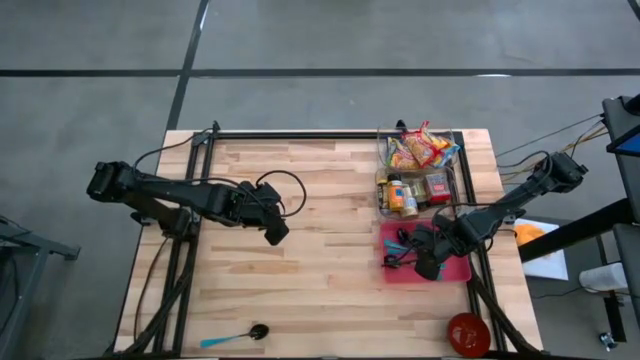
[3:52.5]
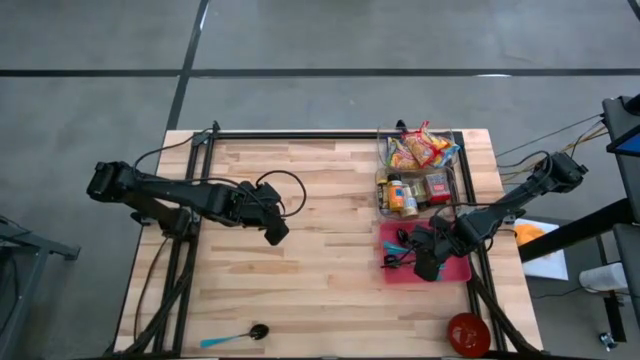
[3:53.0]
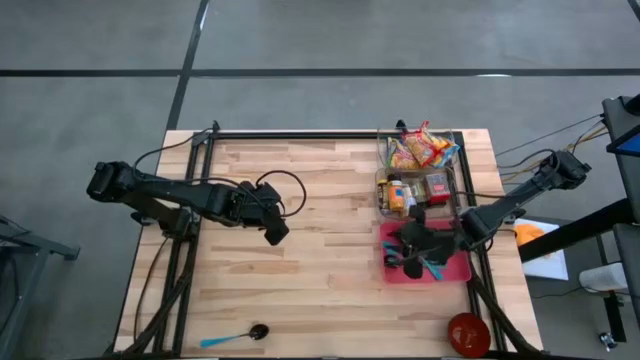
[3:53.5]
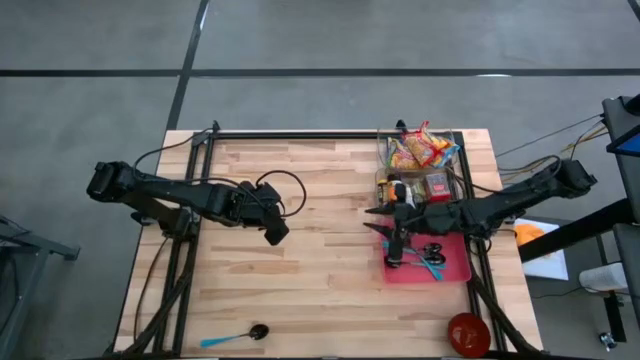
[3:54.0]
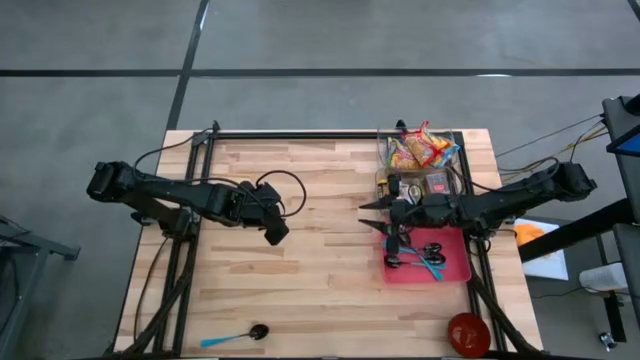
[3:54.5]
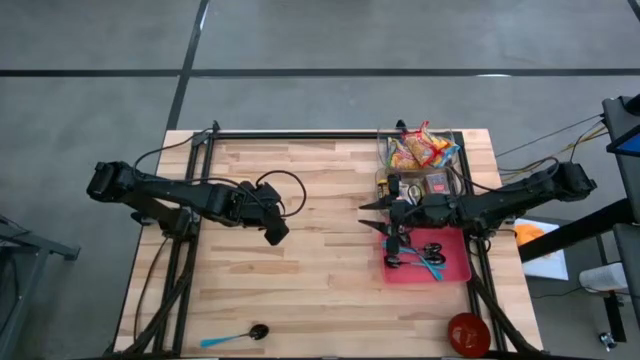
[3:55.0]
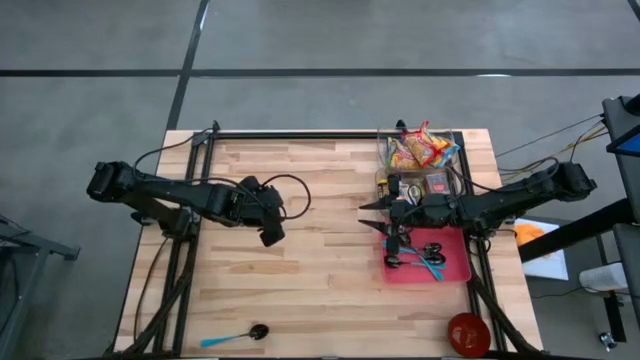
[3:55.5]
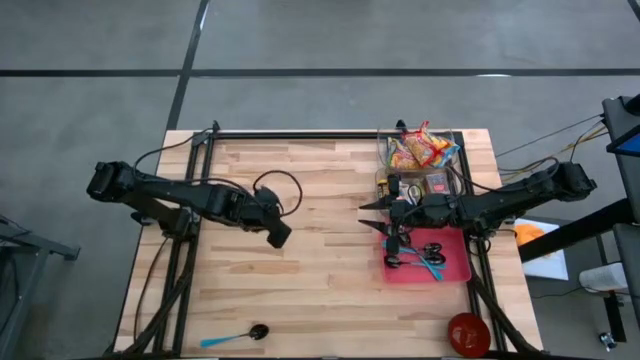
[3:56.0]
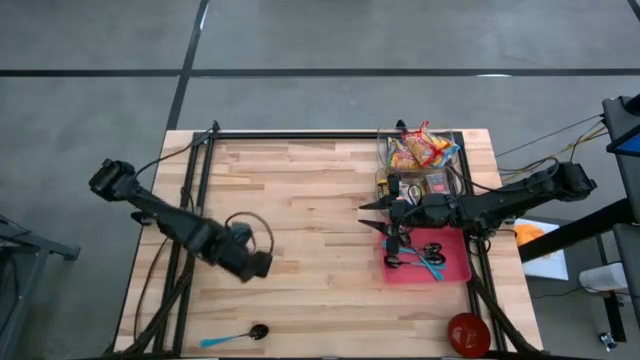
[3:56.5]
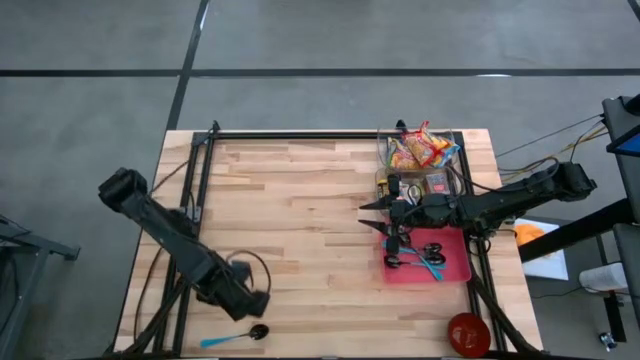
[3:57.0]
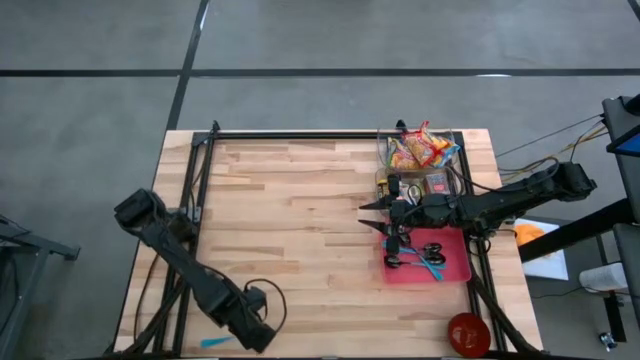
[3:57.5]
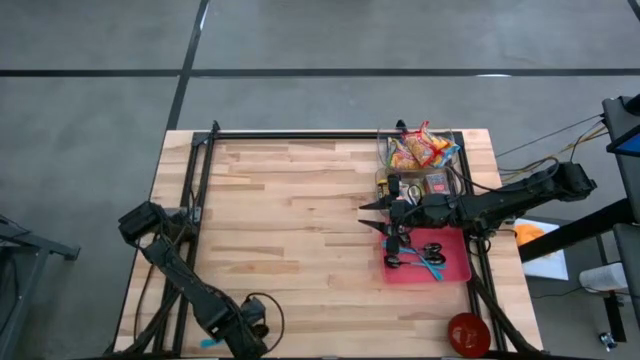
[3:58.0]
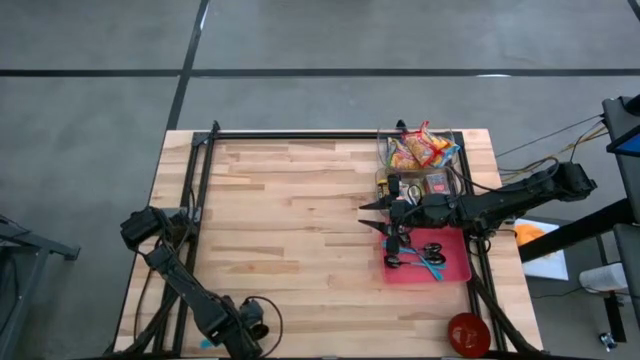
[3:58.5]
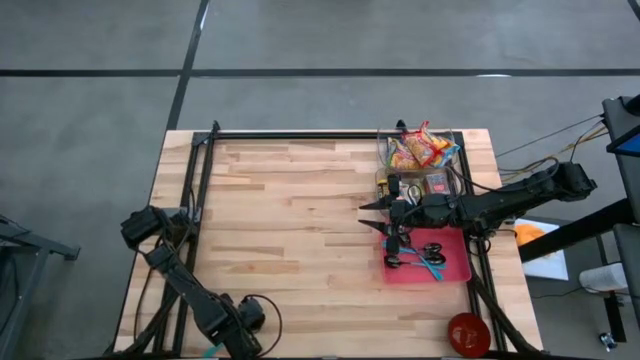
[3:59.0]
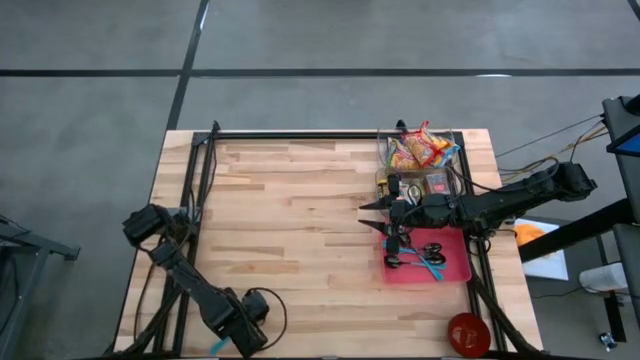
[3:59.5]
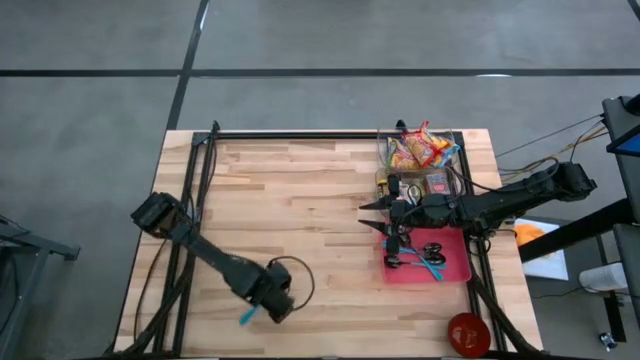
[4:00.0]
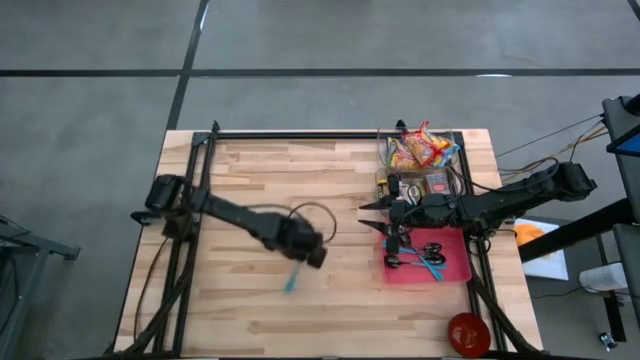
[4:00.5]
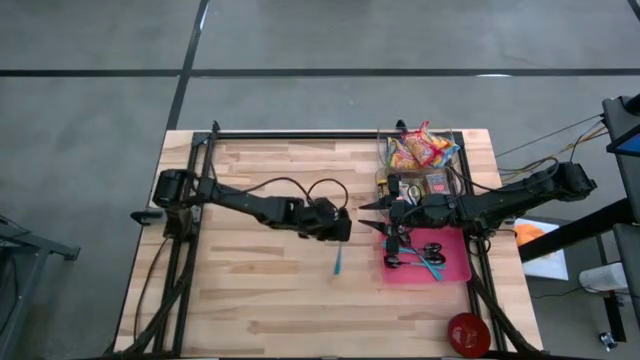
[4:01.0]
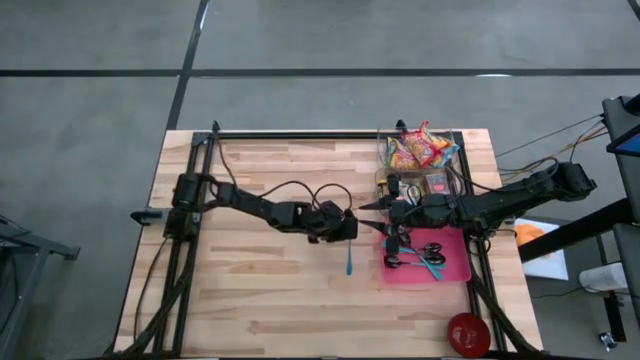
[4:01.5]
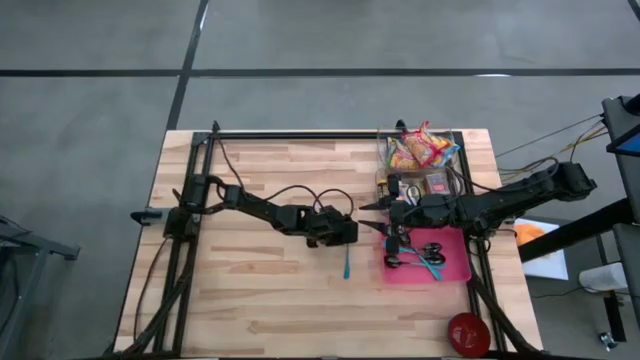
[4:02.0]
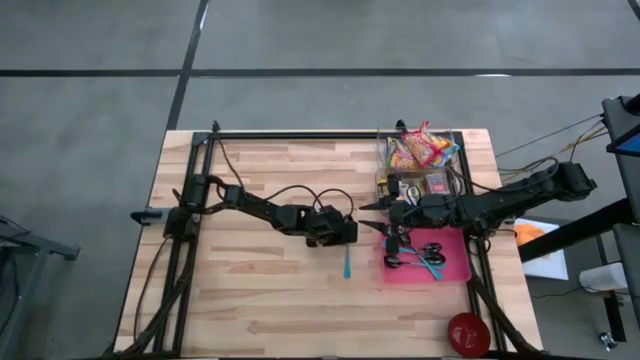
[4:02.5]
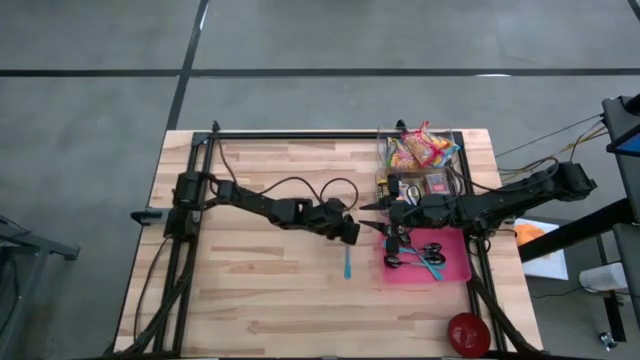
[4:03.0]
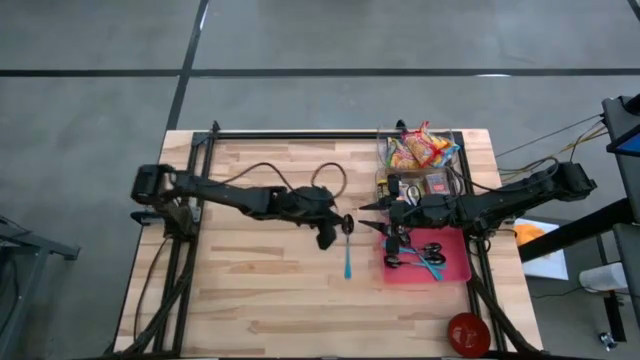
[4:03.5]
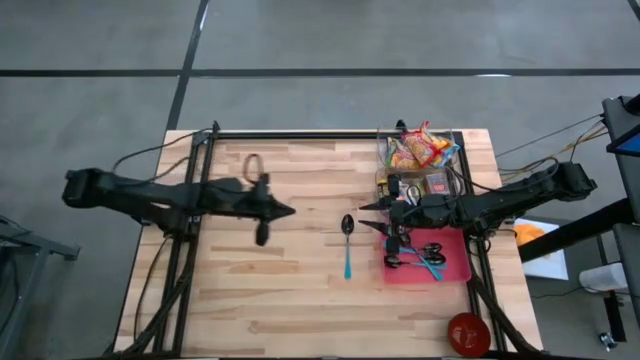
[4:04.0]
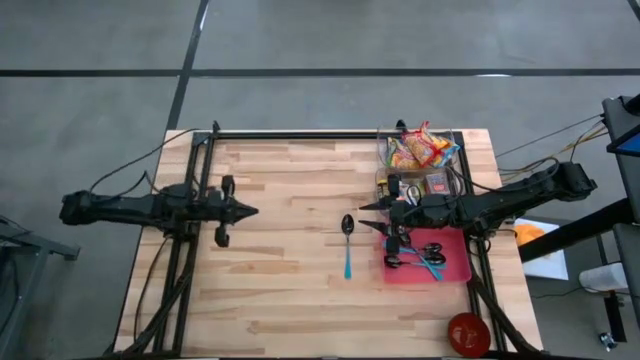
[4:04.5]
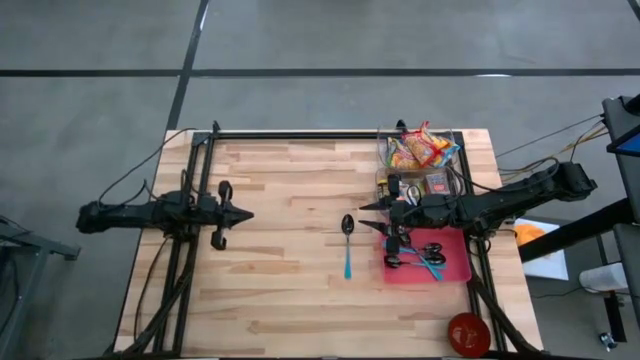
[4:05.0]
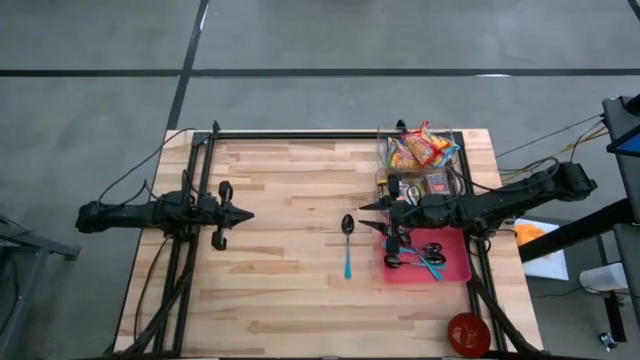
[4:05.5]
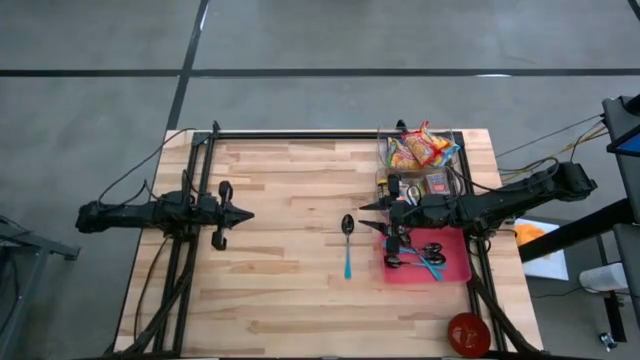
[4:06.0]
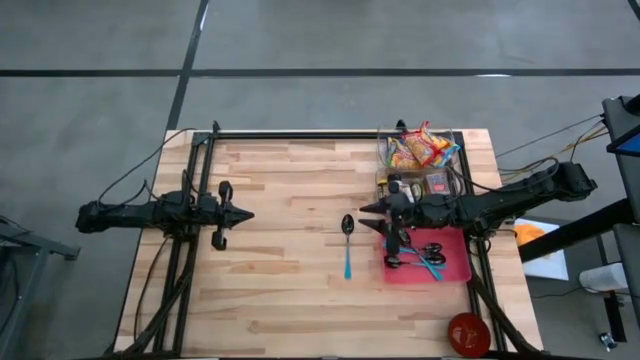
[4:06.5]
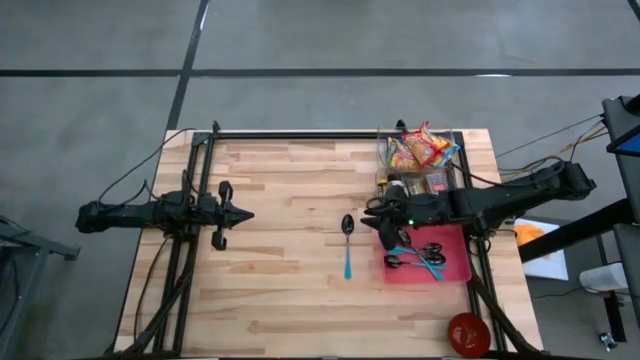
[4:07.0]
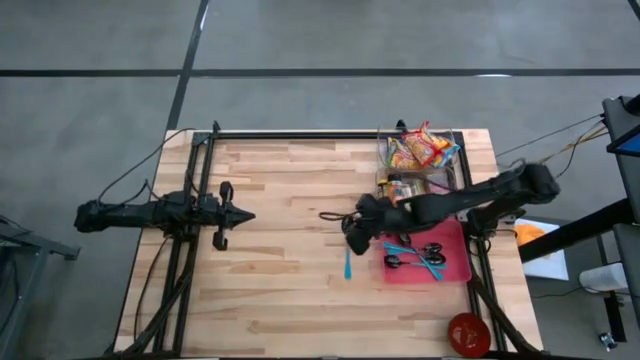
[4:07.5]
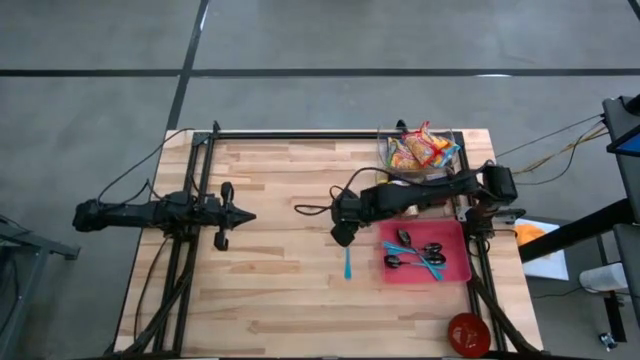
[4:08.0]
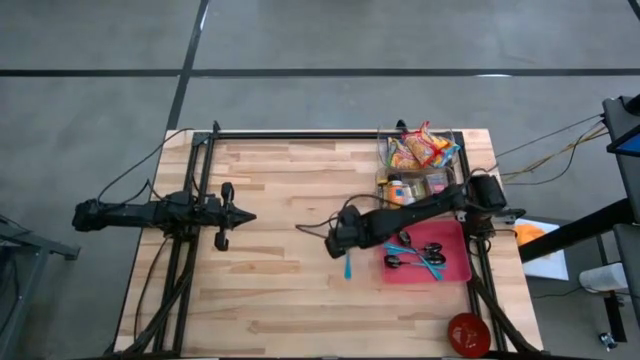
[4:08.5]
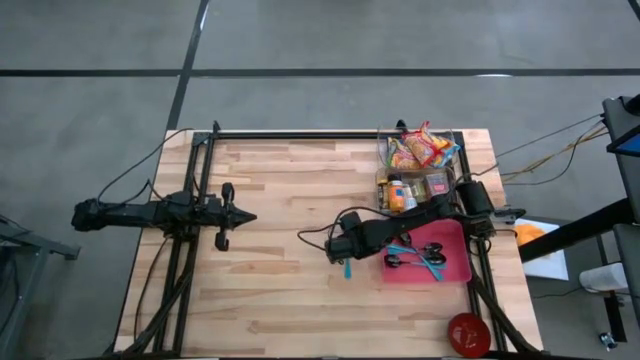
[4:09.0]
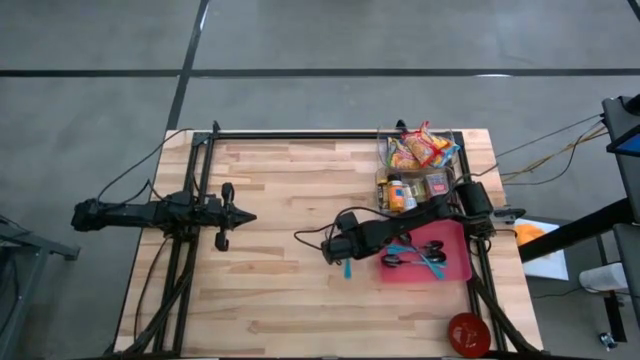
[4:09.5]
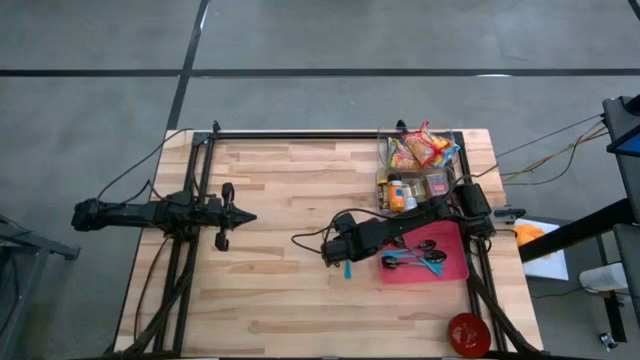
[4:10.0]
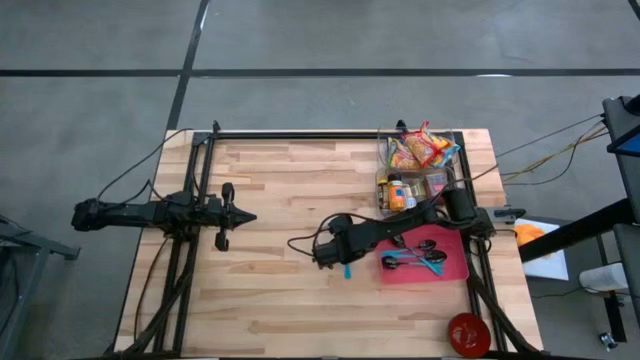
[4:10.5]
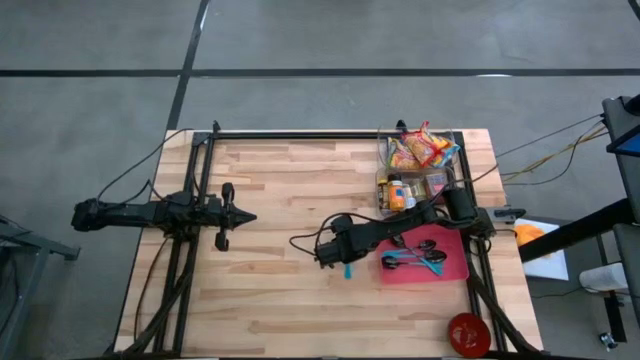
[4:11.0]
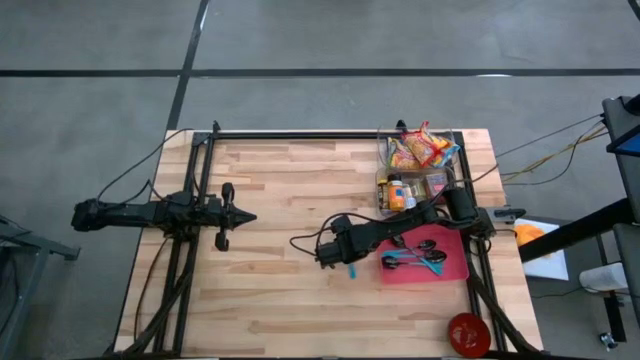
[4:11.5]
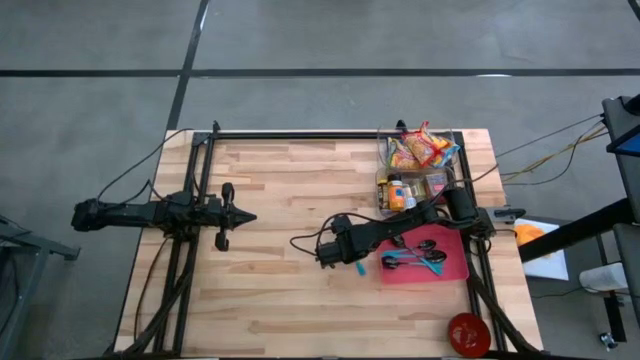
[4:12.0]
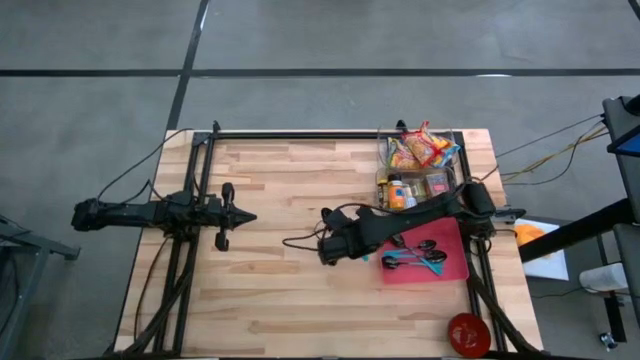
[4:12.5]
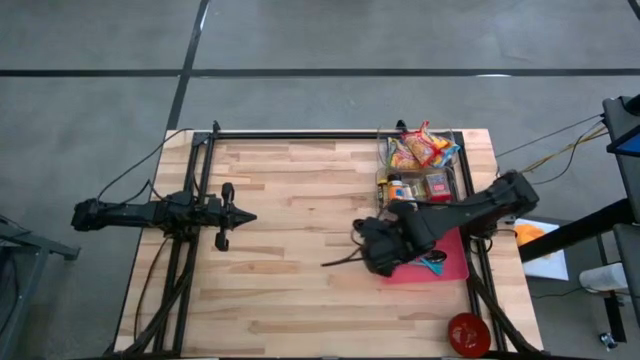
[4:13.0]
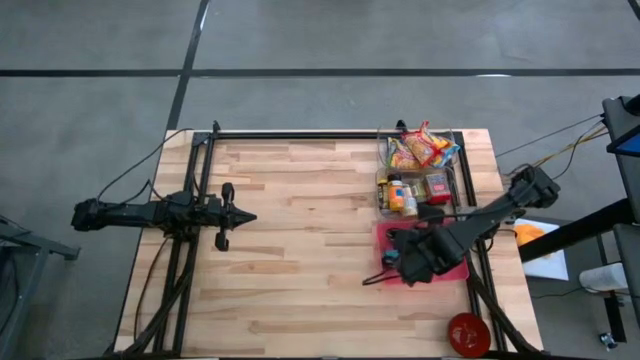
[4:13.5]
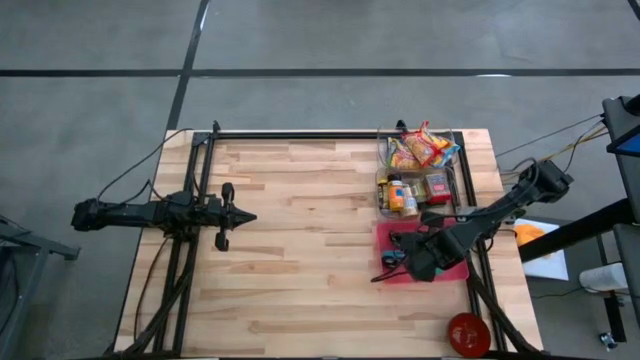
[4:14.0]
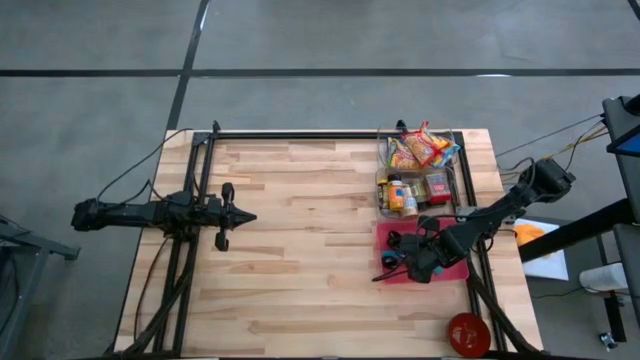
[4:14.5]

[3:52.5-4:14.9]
Put the blue spoon into the red bin
